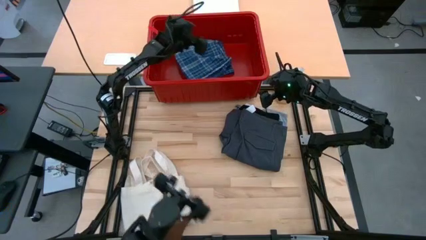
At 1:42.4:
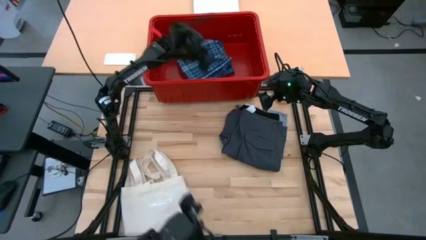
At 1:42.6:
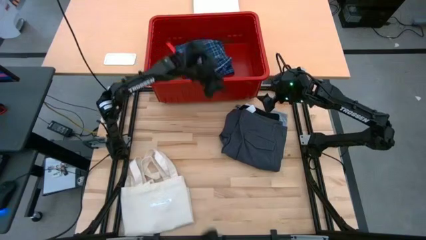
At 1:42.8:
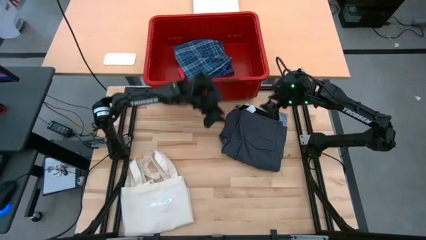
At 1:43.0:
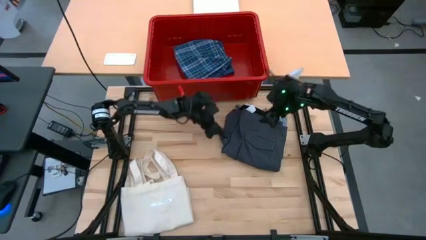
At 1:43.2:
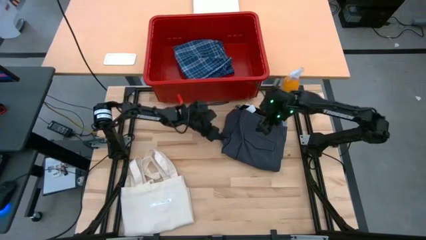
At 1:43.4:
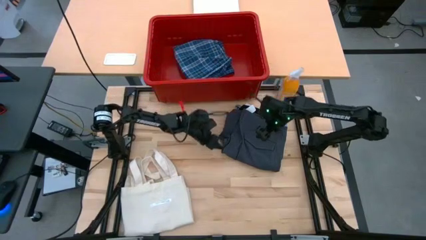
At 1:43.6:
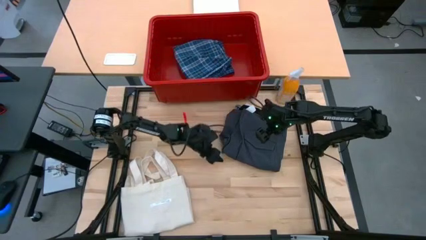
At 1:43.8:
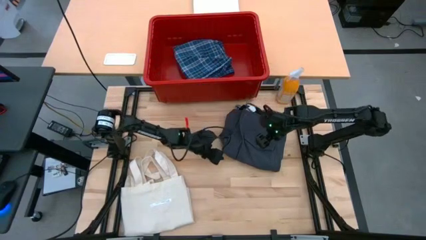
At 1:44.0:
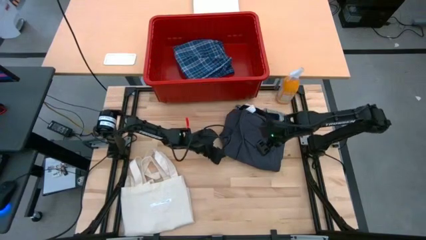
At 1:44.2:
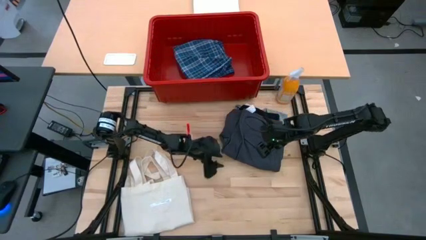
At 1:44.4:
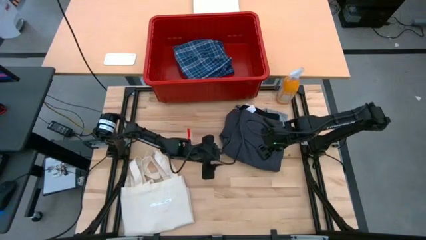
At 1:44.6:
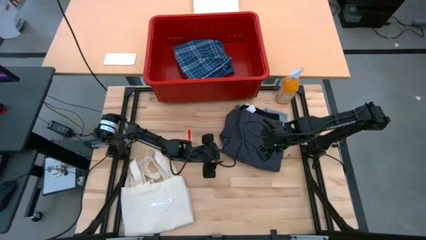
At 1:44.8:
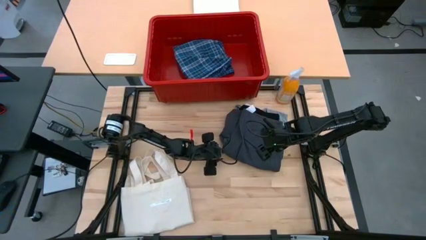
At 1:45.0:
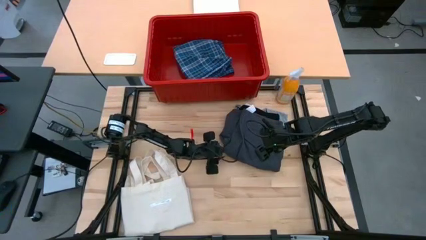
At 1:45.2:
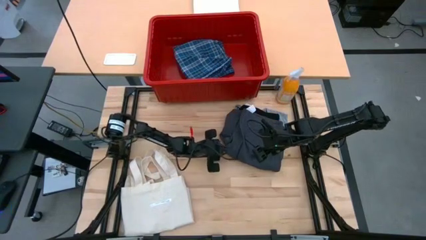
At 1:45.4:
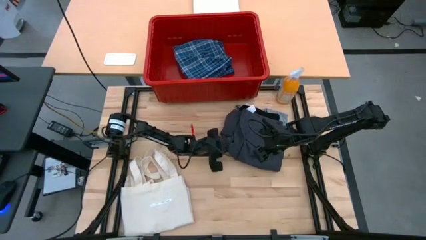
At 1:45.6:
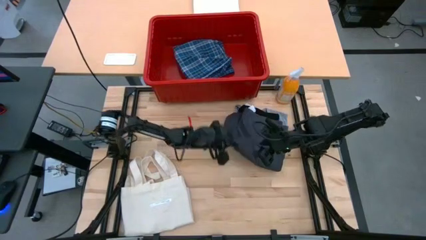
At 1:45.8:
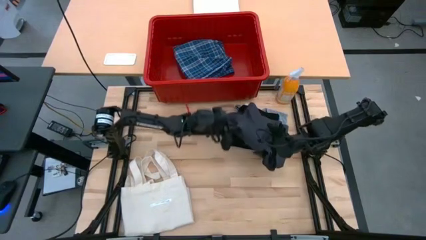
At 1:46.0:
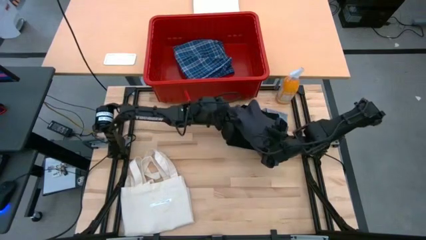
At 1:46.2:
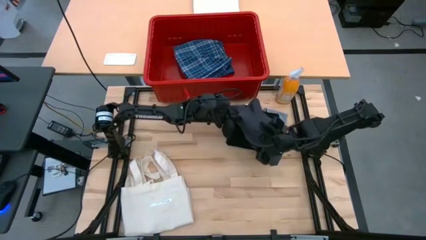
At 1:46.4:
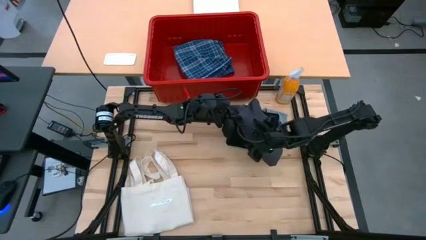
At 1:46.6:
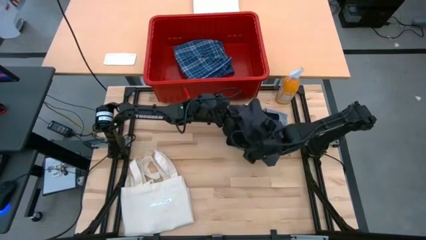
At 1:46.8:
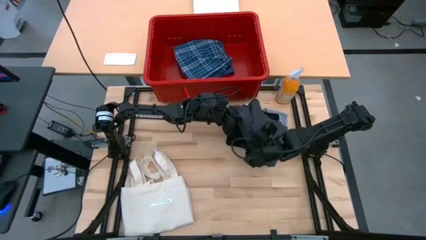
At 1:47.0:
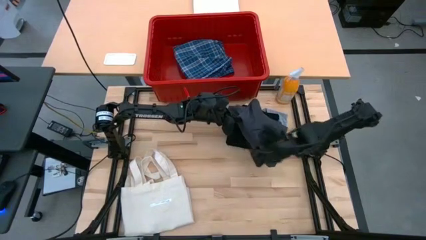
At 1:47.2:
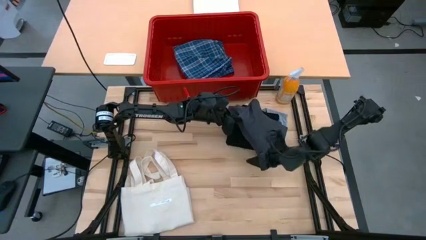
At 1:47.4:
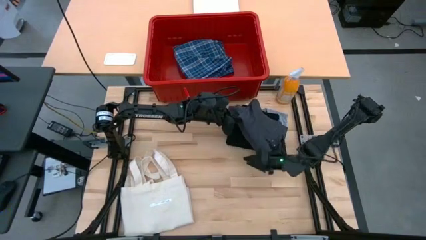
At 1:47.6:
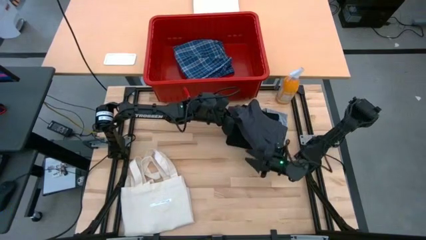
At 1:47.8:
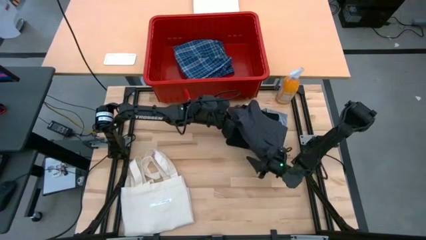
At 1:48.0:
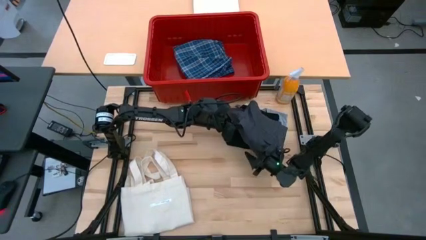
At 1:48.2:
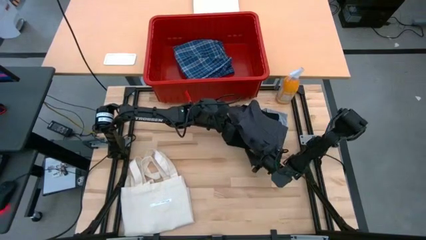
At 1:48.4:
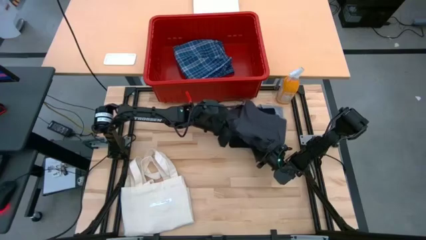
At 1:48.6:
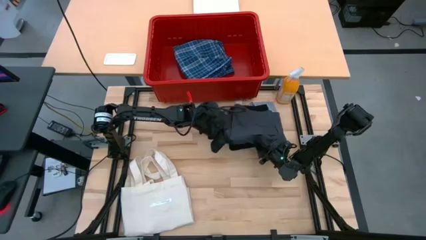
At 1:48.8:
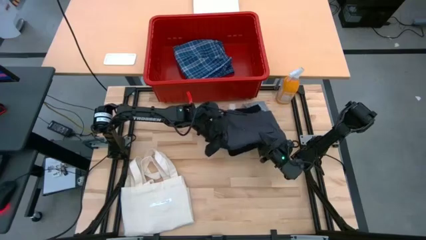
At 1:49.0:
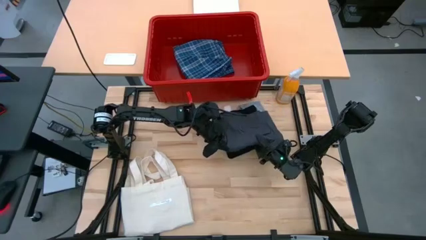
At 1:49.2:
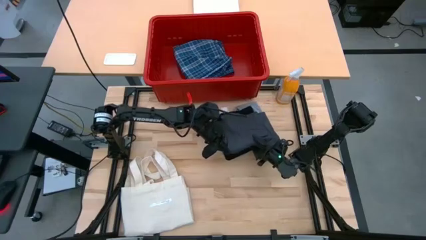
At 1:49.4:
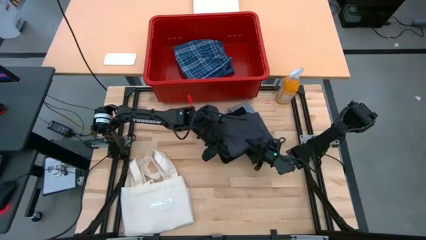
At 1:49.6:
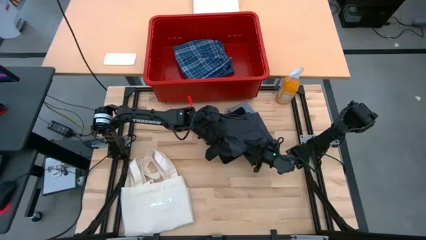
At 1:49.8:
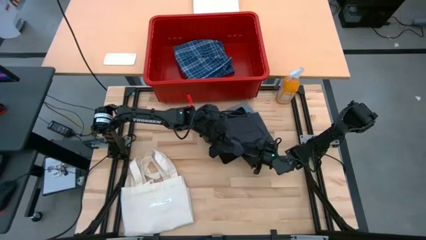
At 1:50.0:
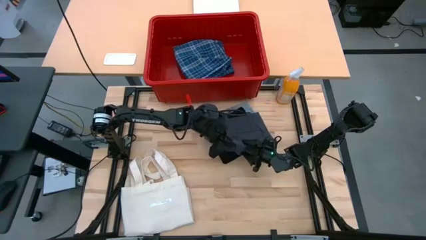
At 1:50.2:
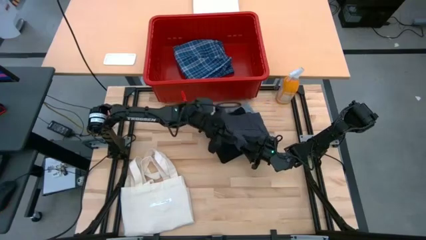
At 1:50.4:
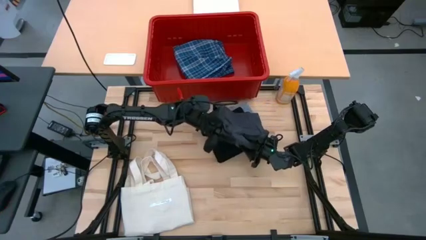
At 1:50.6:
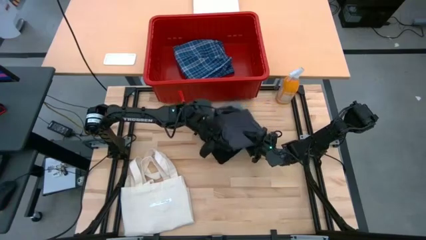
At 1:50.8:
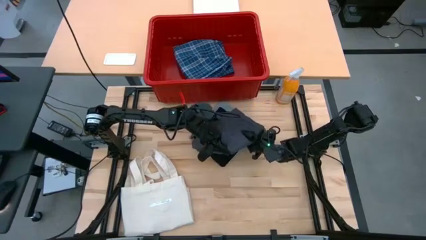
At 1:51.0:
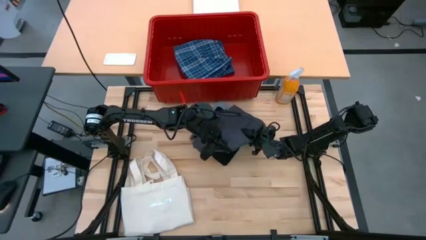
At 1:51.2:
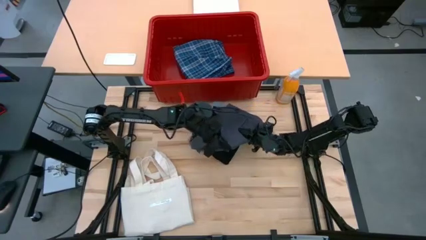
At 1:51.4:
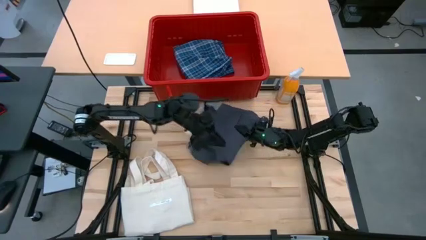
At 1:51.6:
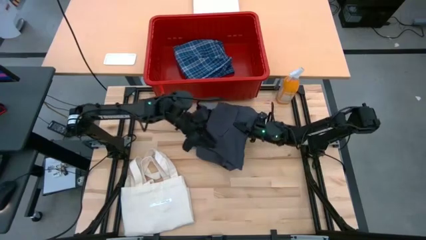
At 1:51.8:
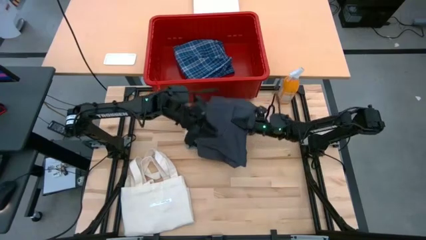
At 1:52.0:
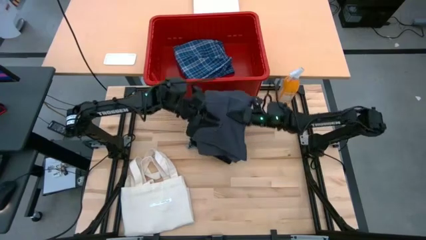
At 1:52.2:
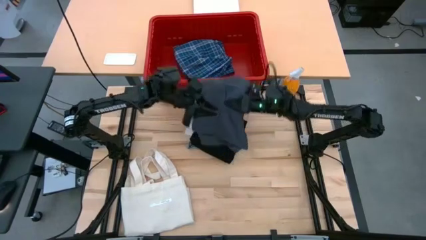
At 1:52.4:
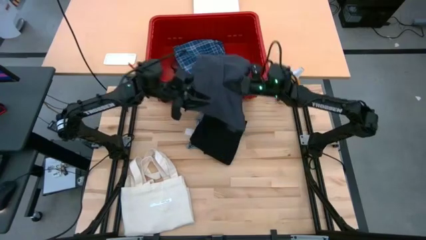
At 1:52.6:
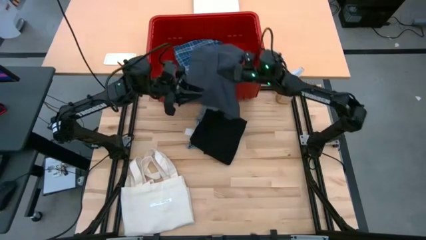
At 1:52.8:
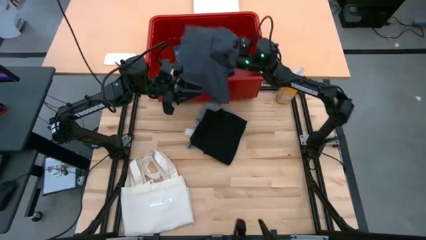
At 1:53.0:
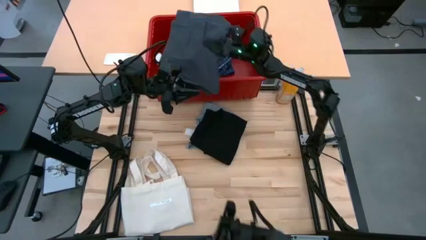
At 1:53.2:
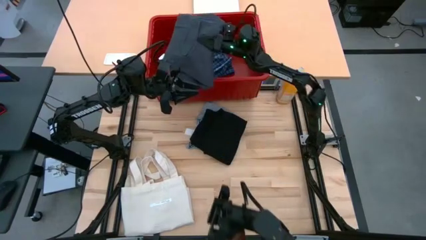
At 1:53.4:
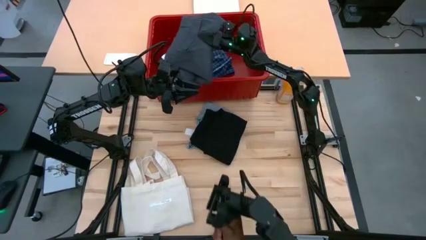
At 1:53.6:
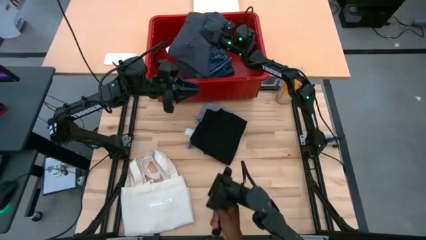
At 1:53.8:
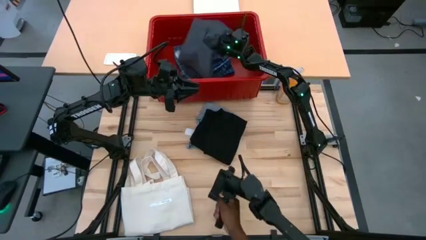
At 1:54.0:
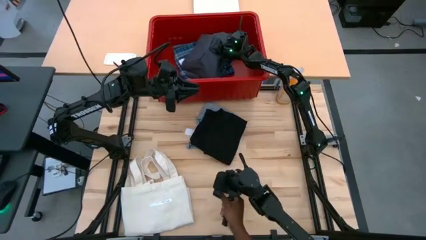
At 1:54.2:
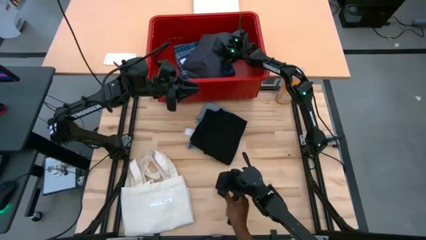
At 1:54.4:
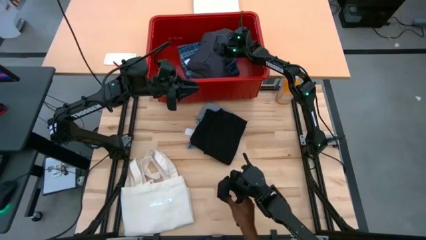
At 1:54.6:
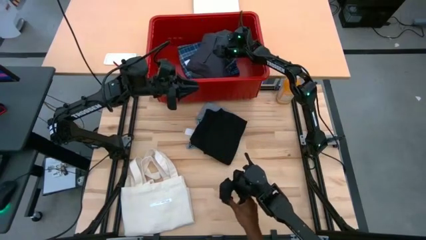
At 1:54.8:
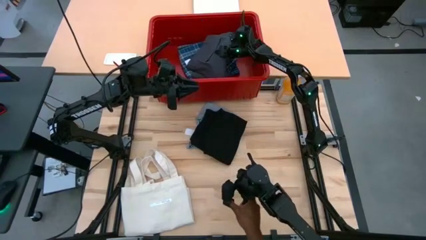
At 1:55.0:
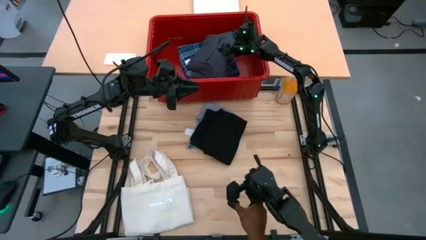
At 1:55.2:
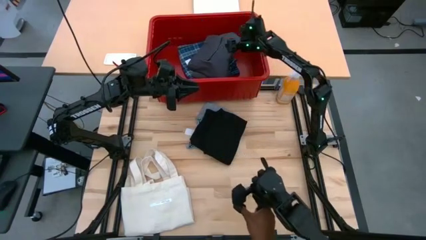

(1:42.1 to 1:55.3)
Task: Fold laundry
Stack the gray pants in the red organizer bin
